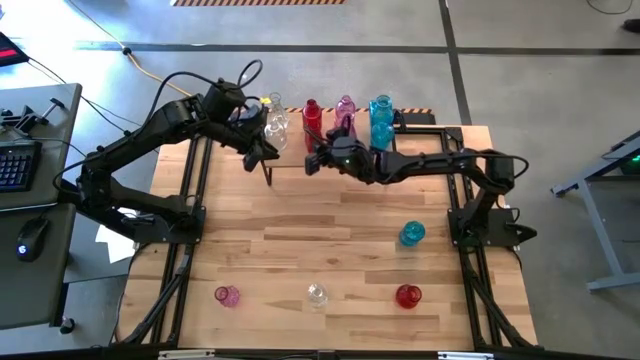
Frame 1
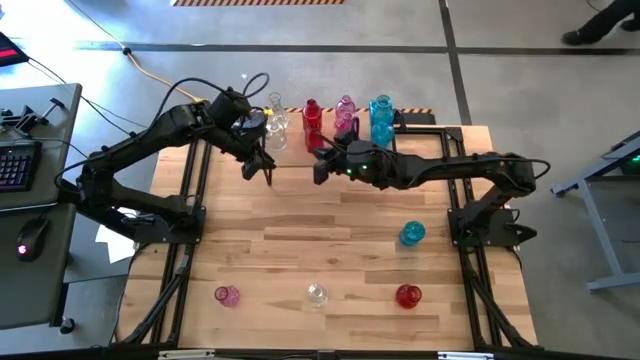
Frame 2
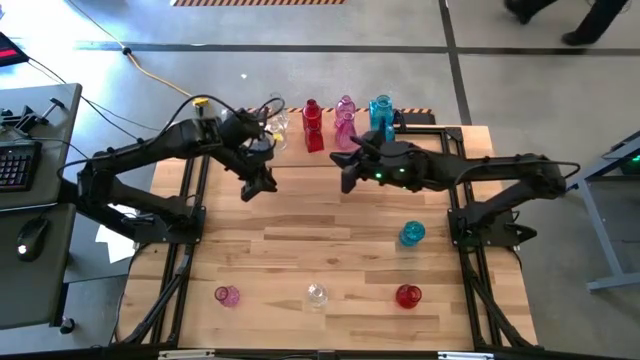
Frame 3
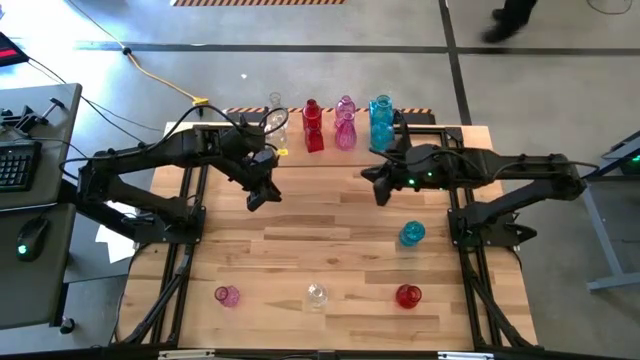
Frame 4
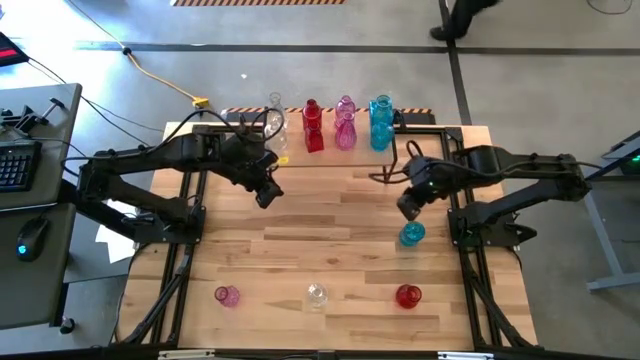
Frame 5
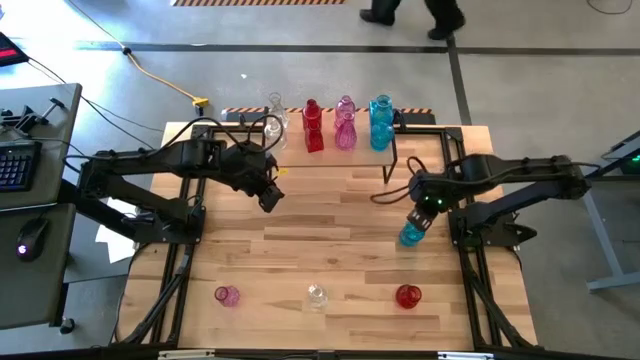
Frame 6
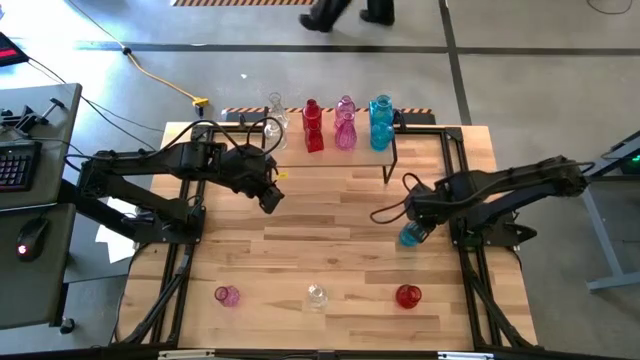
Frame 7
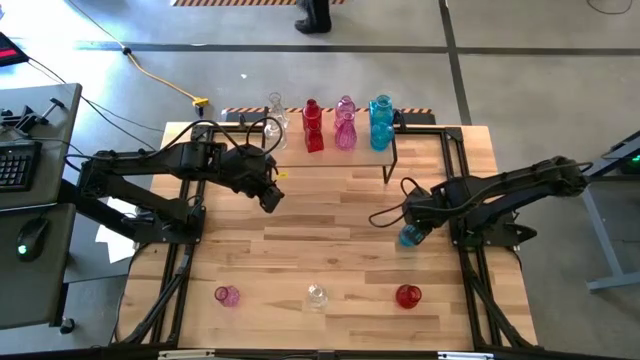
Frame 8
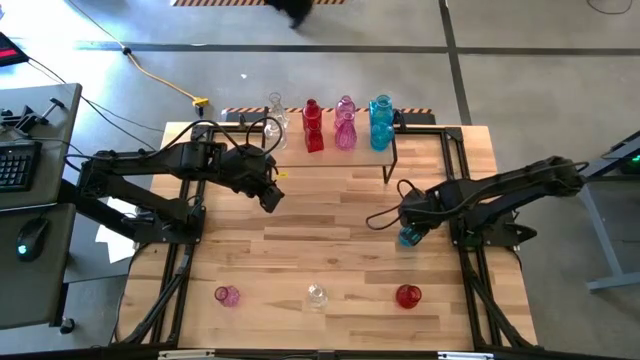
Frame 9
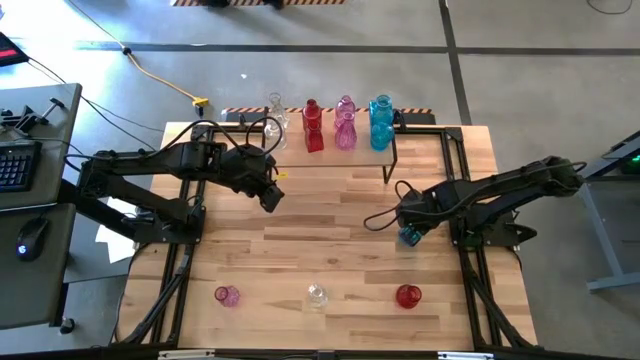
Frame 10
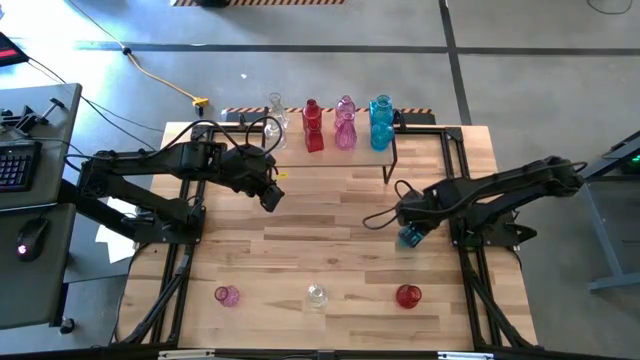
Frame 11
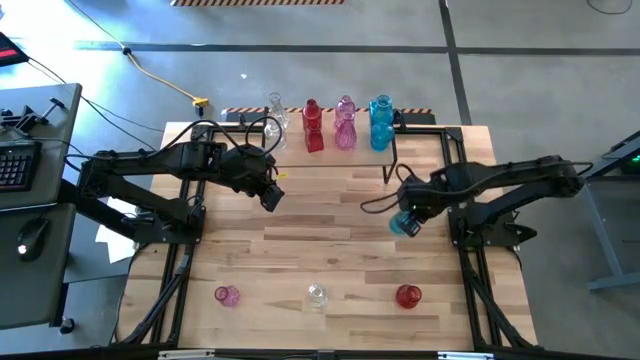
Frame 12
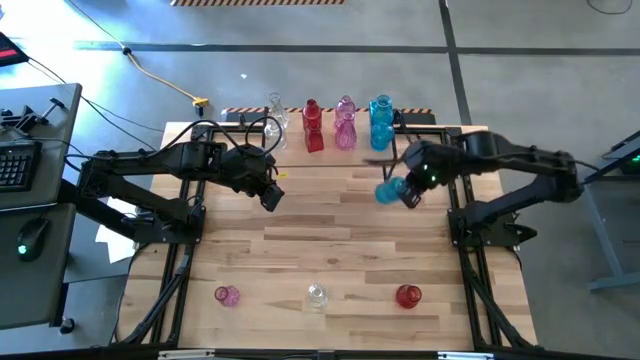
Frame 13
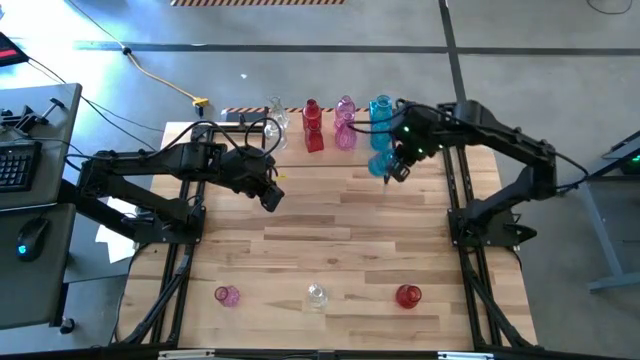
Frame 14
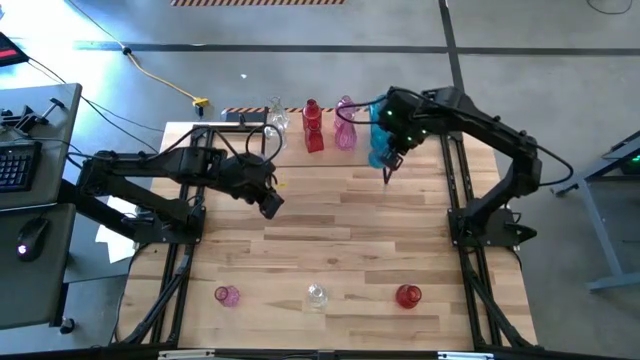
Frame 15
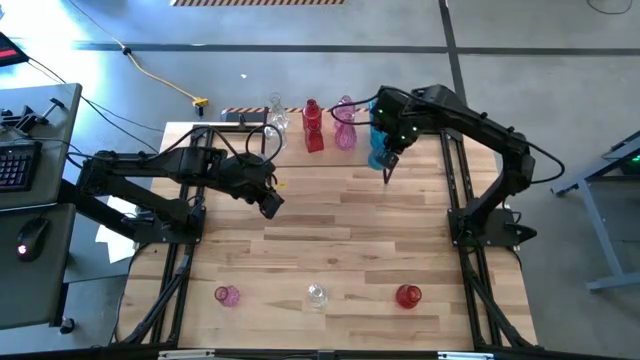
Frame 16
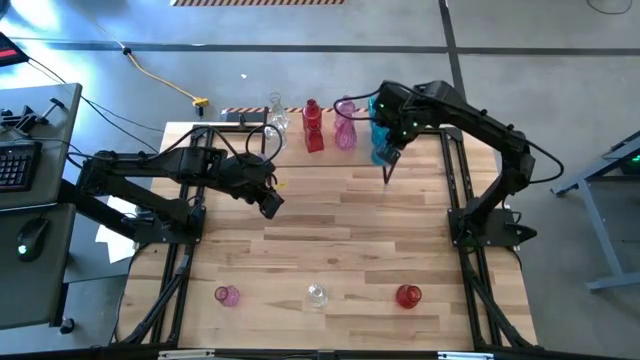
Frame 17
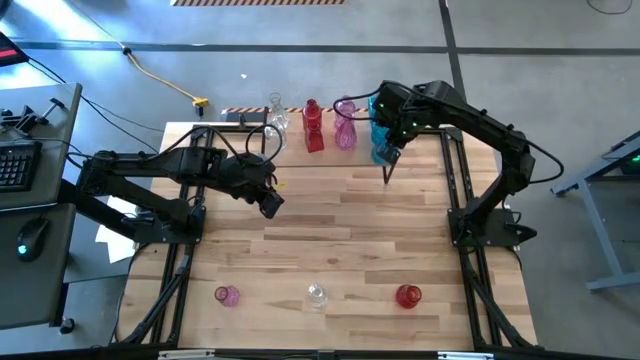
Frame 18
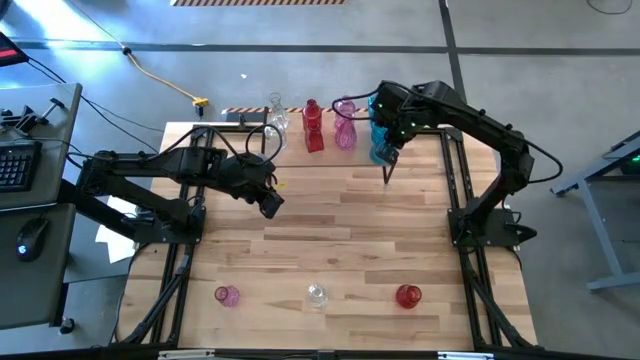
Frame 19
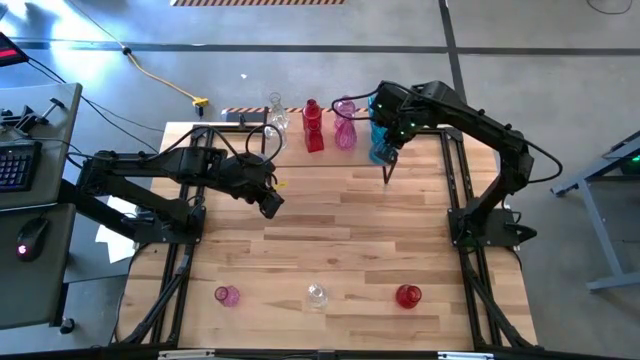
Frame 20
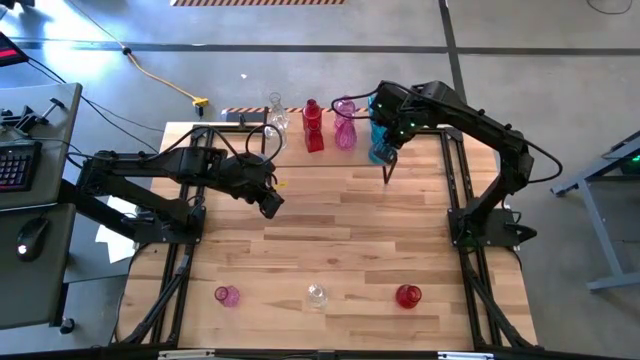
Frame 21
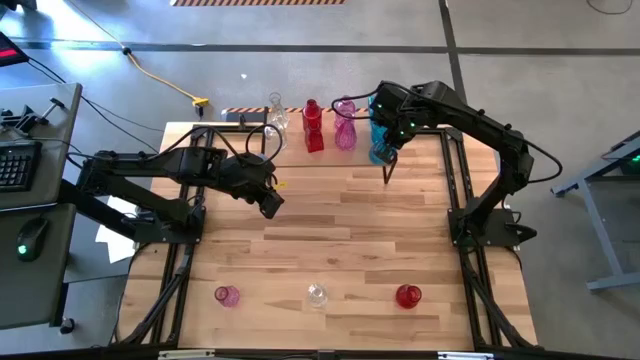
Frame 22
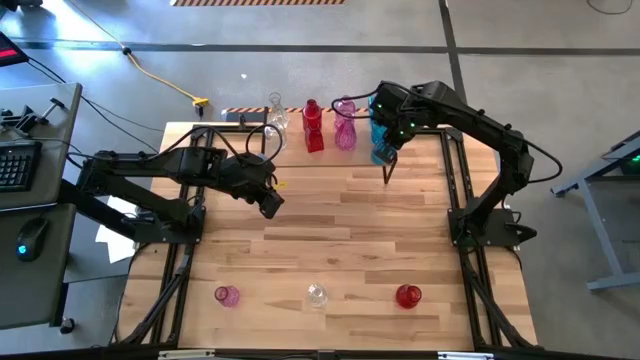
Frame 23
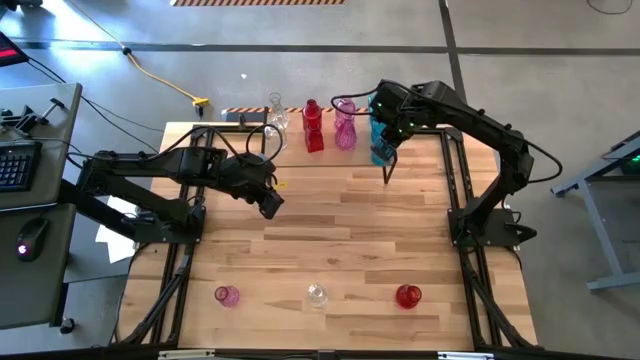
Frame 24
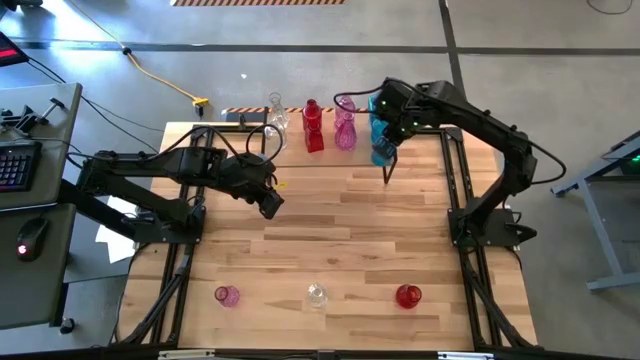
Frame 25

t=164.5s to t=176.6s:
Task: sort vases onto shelf
Put the blue vase on the shelf aligned with the other blue vases
